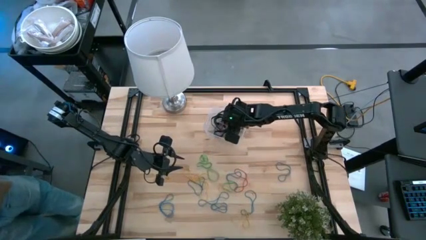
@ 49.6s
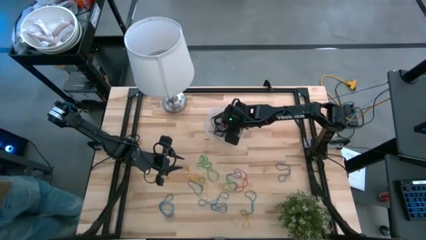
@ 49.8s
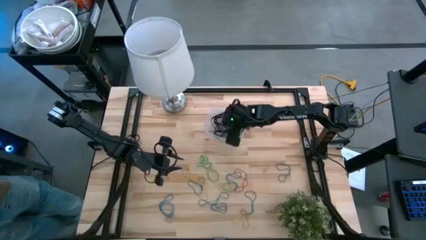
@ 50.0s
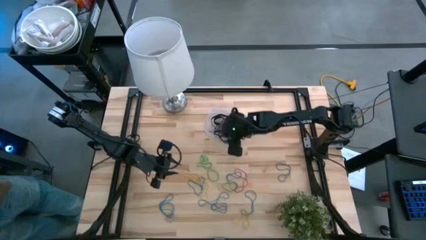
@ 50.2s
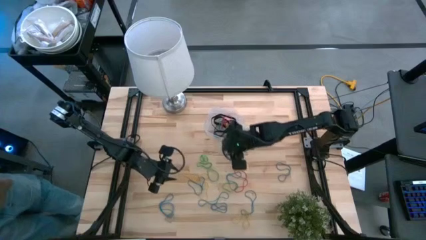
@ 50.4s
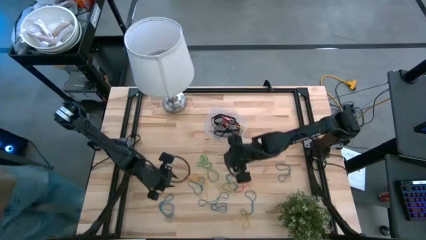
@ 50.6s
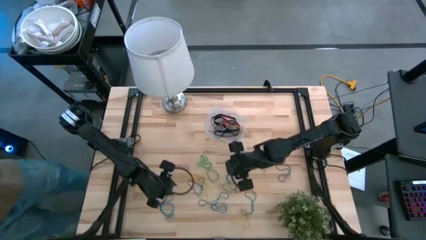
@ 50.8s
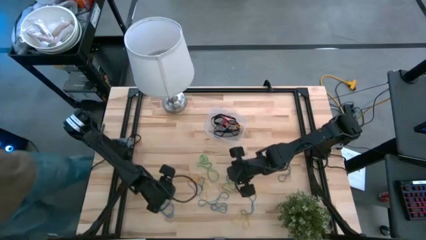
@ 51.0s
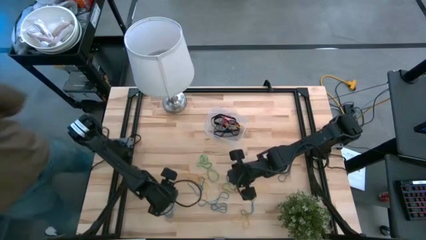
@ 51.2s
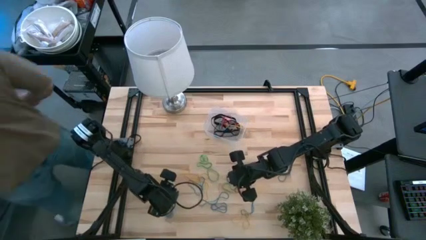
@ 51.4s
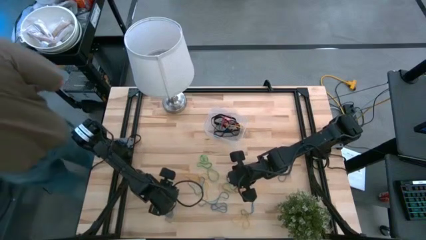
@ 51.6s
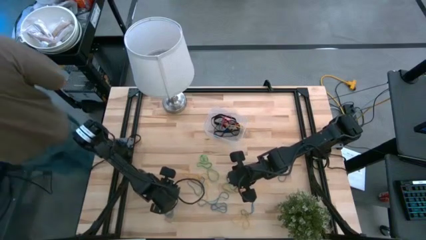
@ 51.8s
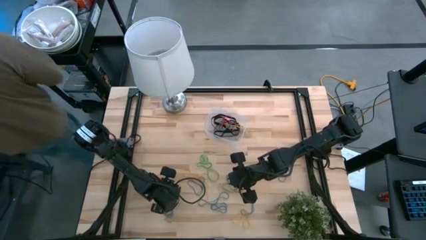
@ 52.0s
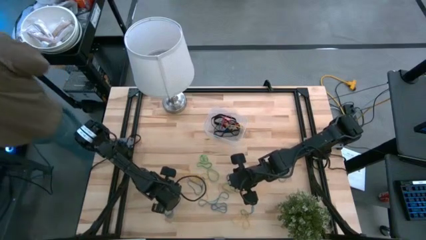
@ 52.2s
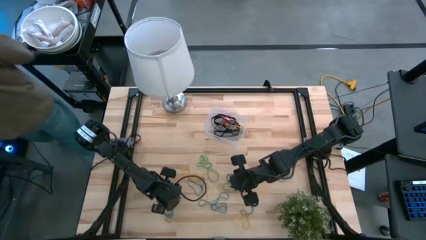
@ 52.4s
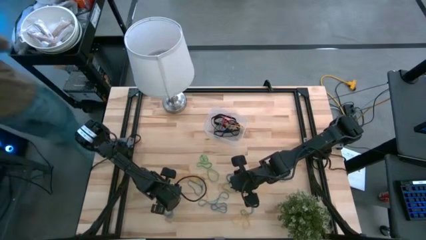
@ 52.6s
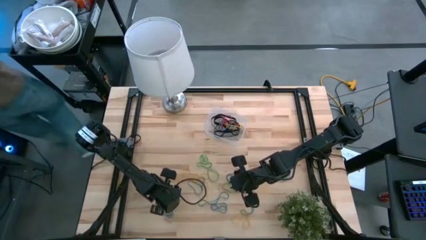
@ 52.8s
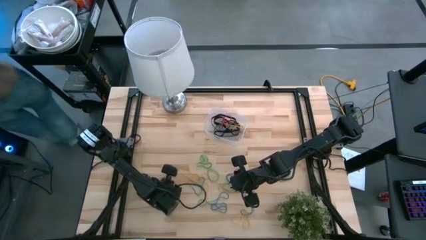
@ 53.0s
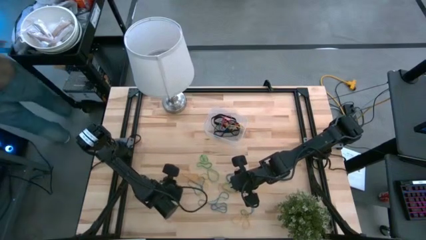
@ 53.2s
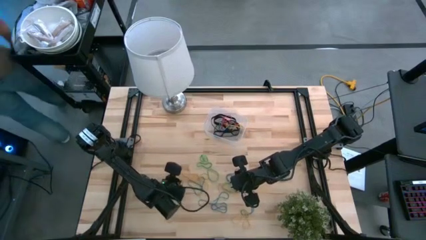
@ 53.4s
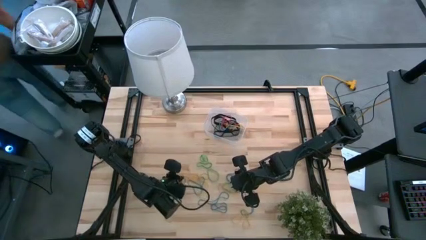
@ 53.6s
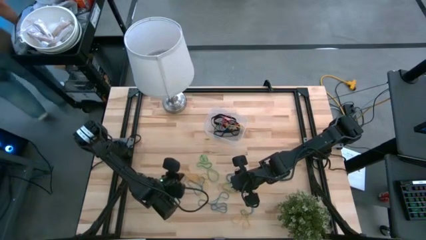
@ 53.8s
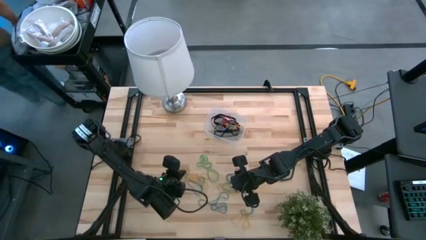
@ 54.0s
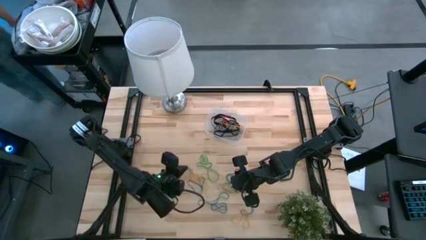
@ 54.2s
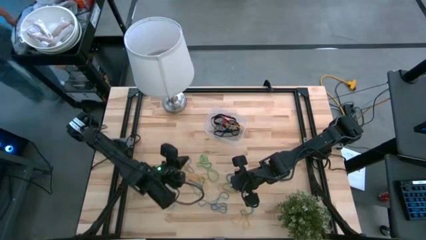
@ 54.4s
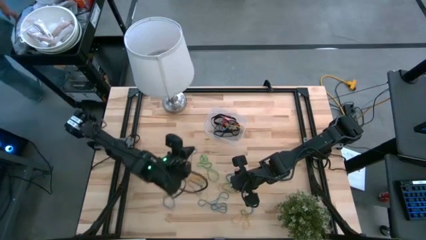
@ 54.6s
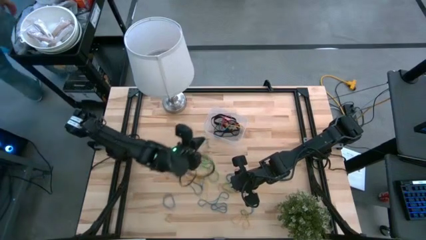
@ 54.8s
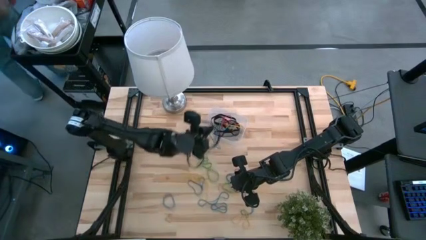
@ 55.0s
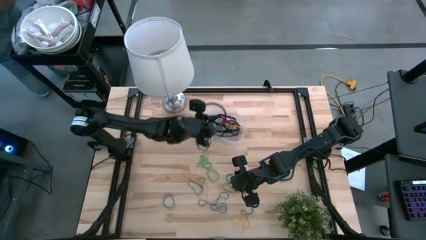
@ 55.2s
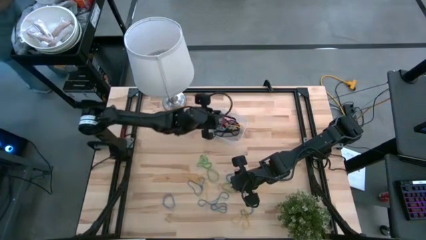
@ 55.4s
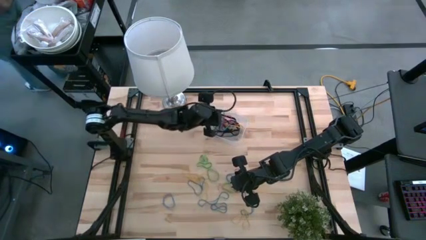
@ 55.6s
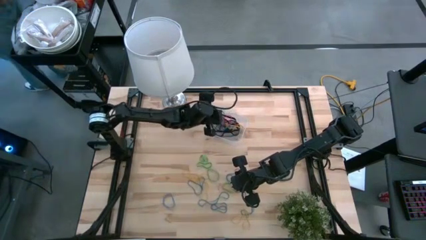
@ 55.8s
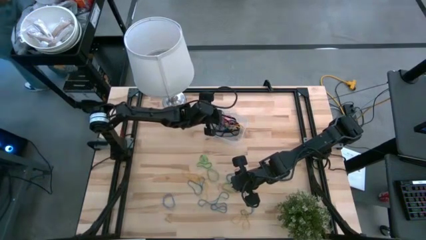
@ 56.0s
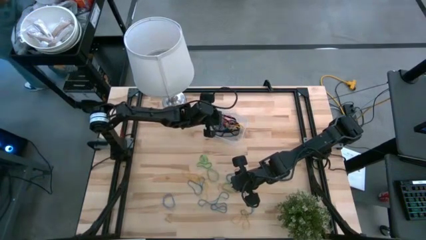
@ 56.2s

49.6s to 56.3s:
Task: Pick and place rubber bands into bin
Put the blue rubber bands into the bin

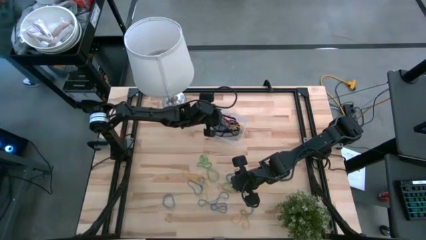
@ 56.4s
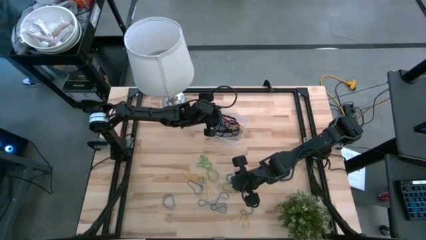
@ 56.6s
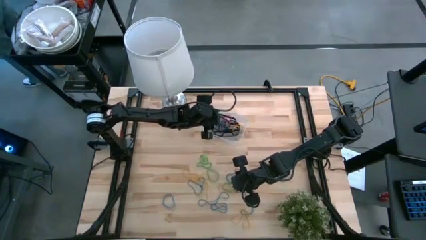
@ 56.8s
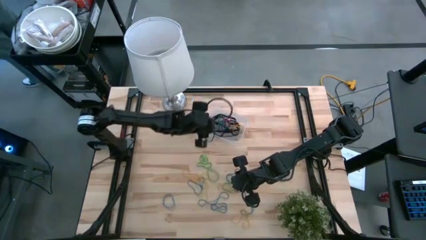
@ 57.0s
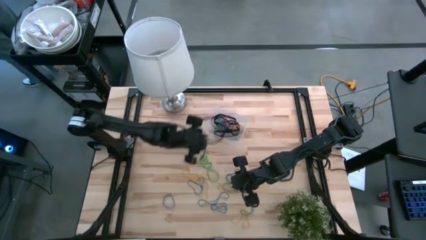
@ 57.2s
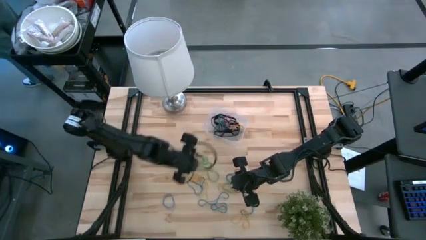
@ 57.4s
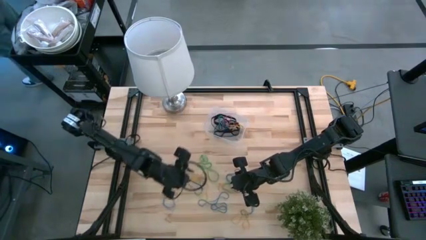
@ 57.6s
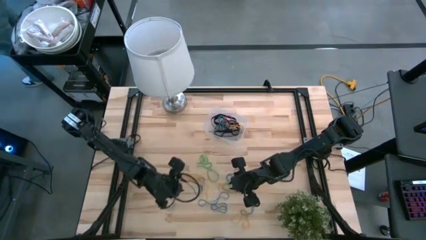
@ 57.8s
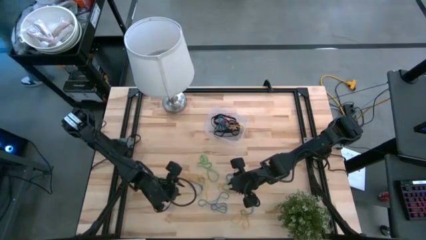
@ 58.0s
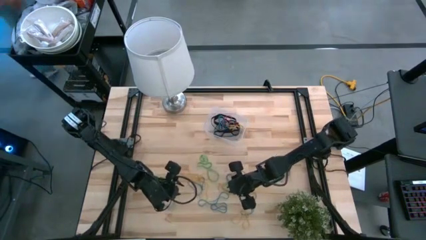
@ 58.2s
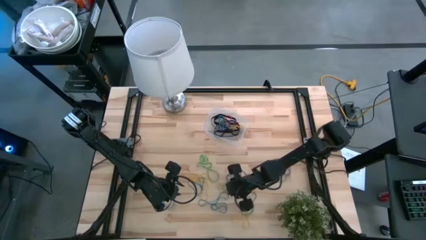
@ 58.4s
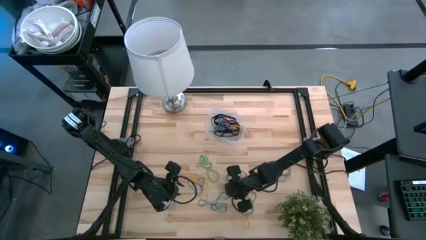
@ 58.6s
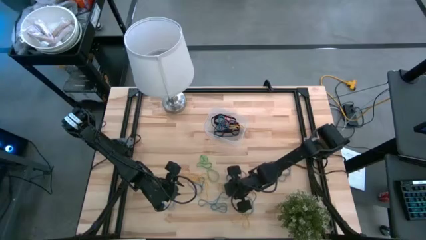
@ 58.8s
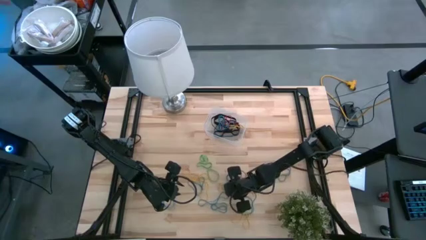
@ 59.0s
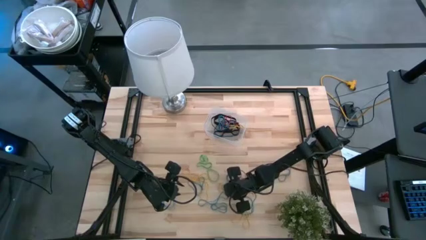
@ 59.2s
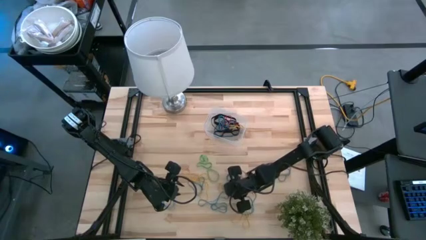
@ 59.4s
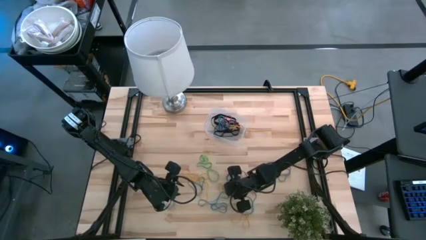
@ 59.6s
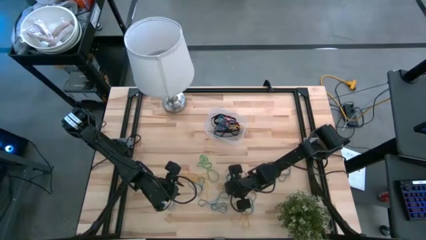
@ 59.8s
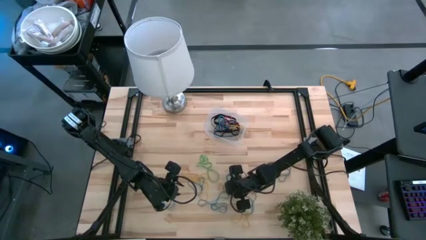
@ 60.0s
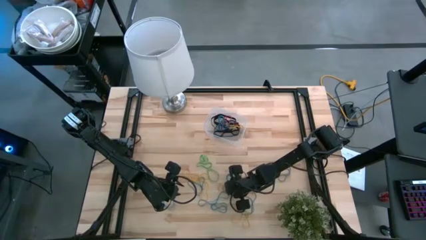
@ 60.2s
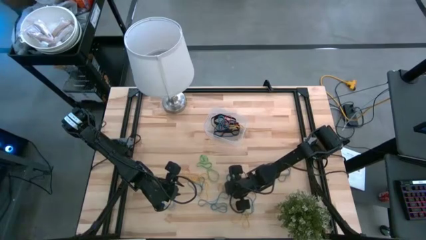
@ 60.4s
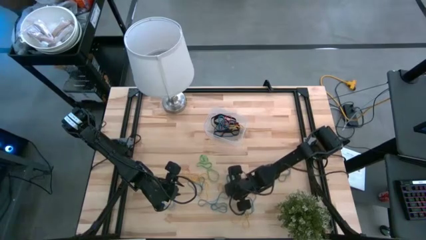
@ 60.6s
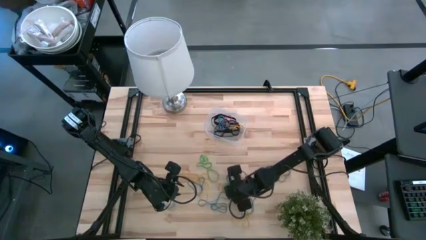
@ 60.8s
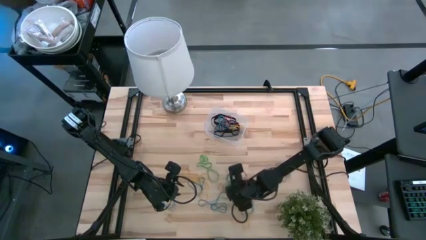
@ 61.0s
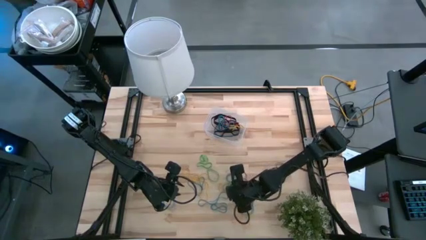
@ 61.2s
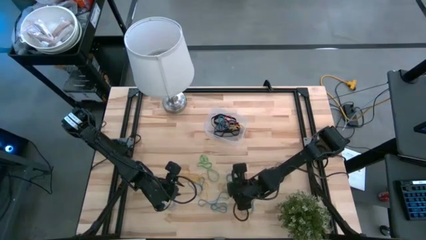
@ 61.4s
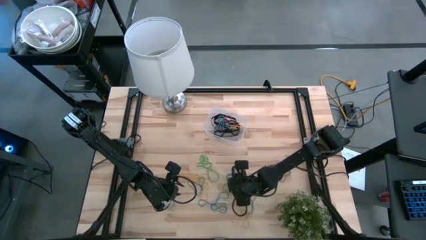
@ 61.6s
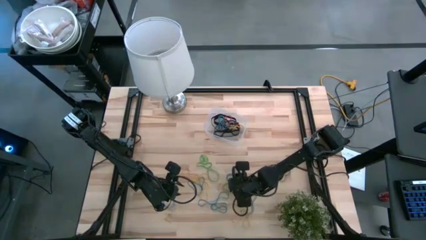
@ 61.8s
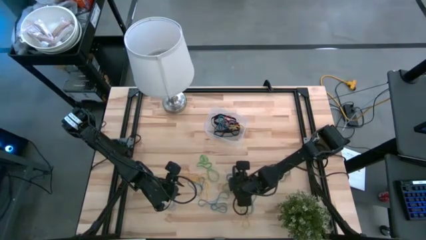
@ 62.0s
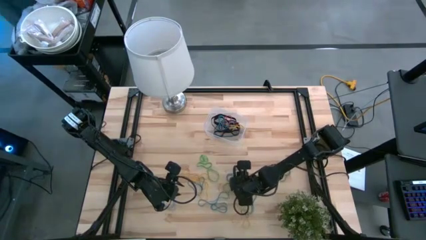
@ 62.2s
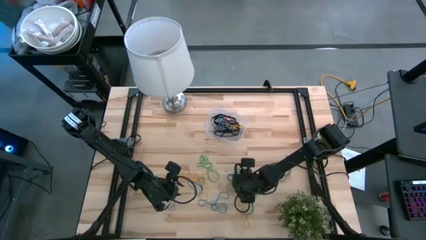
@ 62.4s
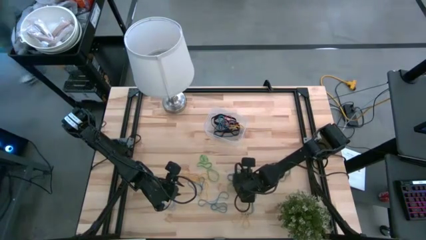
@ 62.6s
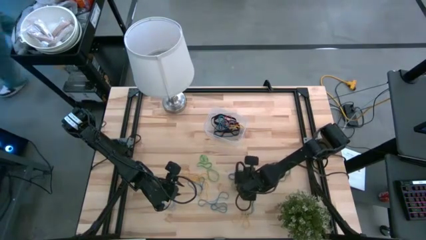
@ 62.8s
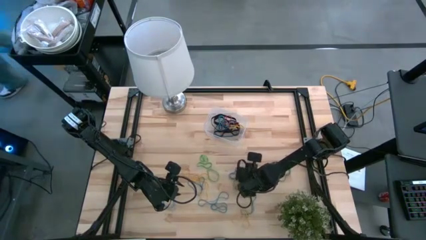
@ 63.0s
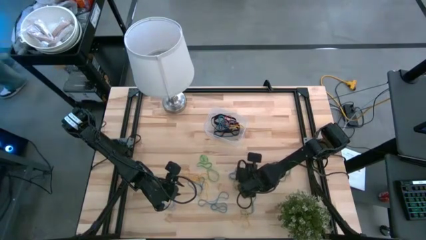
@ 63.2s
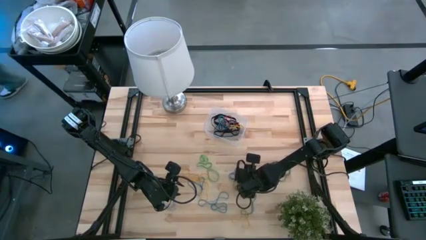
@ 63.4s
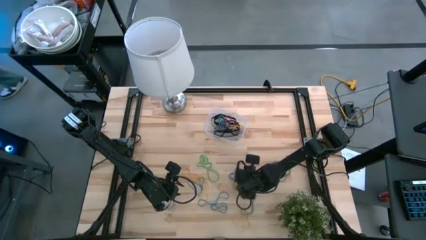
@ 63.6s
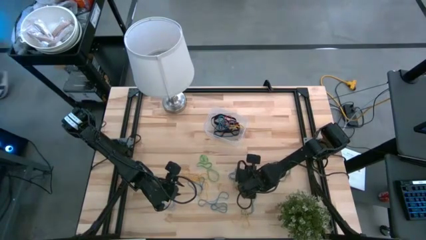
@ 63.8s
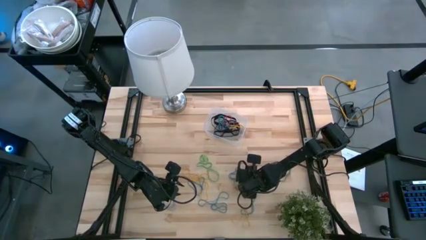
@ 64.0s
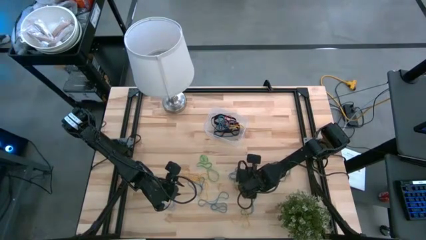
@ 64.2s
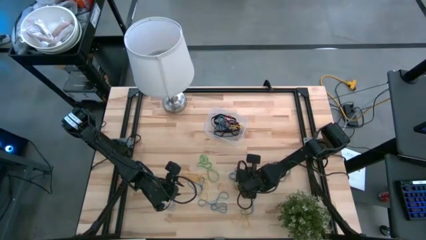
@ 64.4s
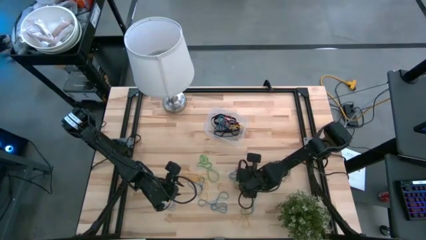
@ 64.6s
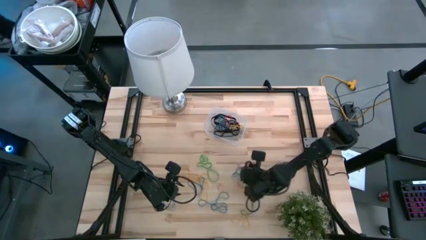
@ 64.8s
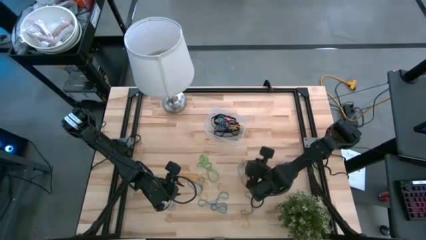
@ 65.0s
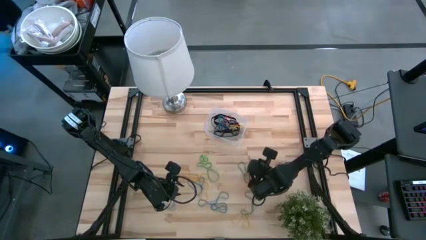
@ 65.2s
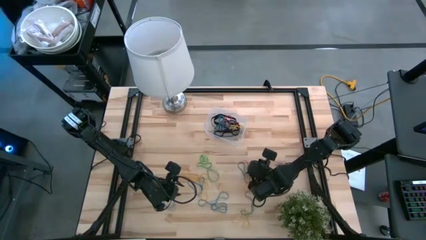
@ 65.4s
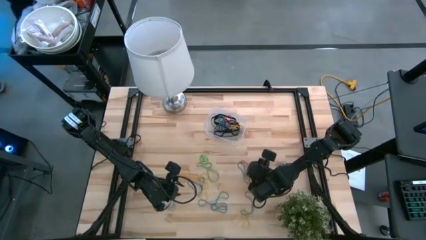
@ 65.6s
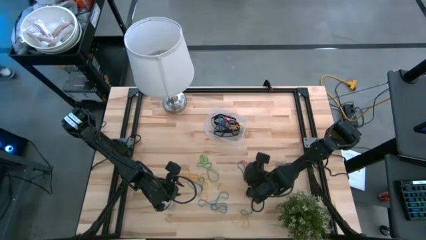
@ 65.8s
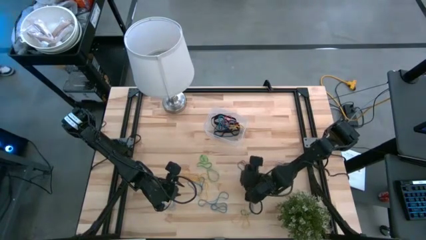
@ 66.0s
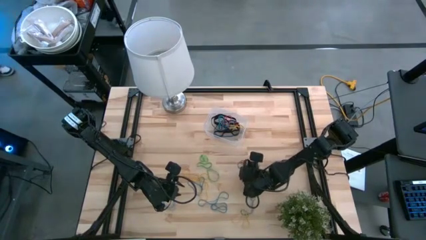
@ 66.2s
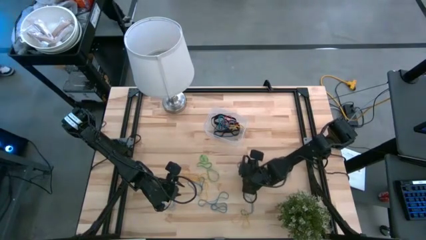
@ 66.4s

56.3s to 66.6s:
Put the blue rubber bands into the bin
